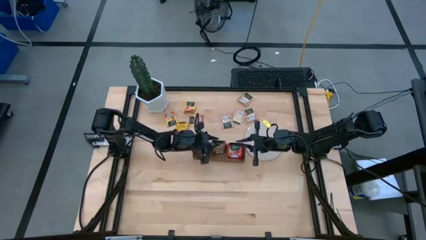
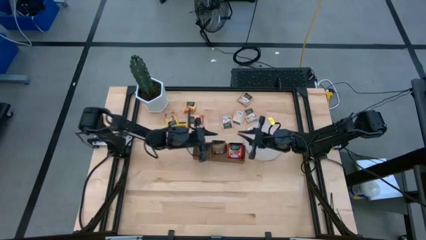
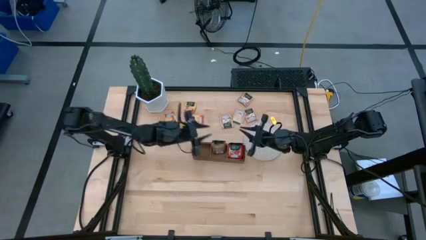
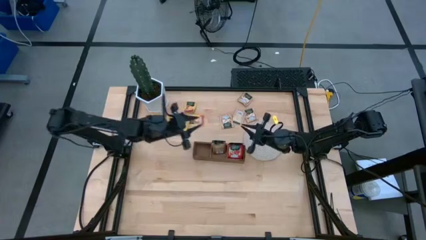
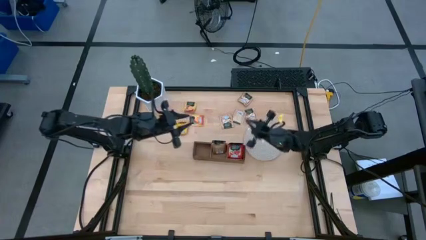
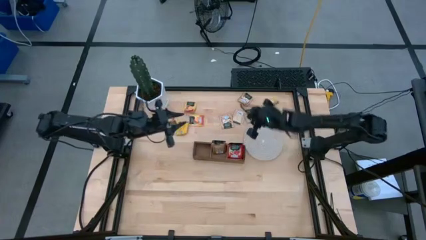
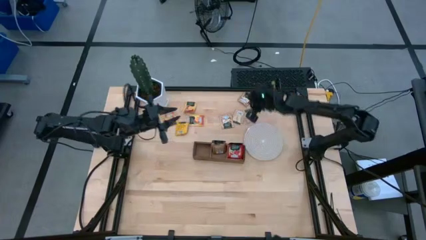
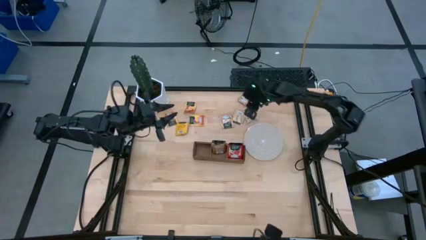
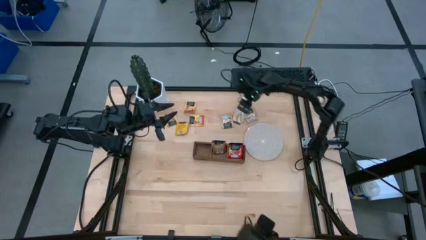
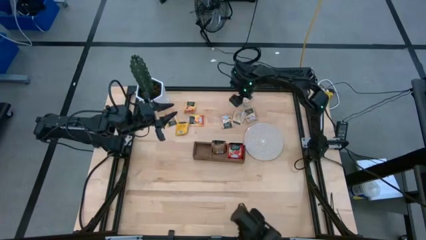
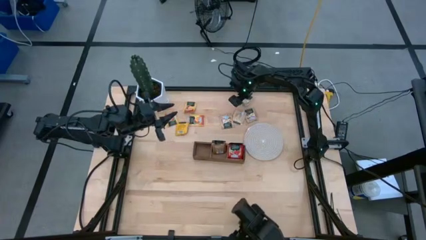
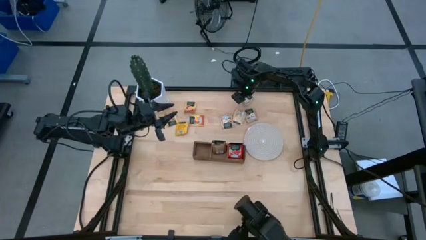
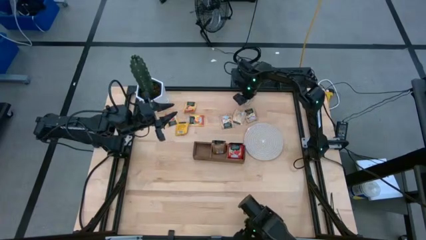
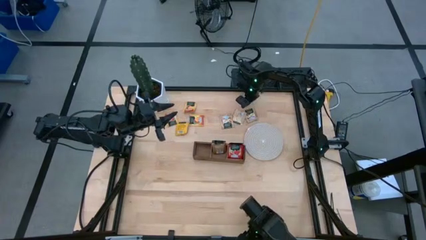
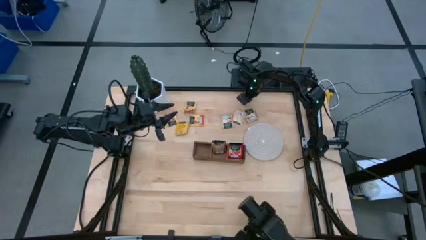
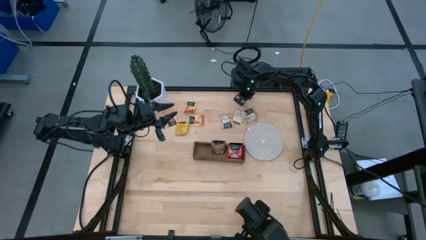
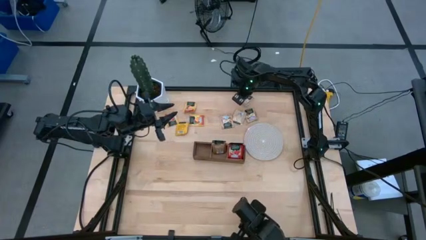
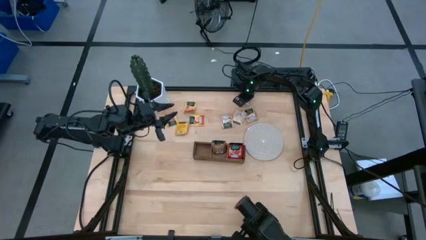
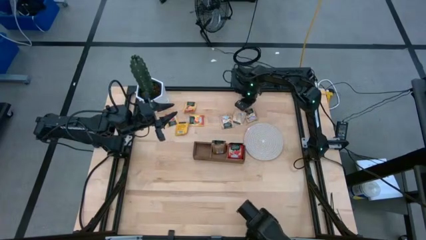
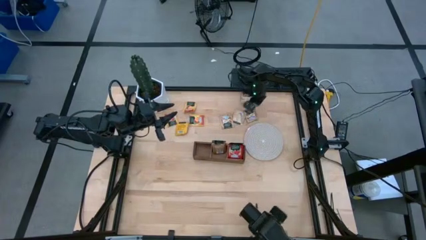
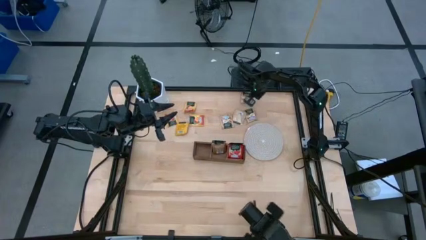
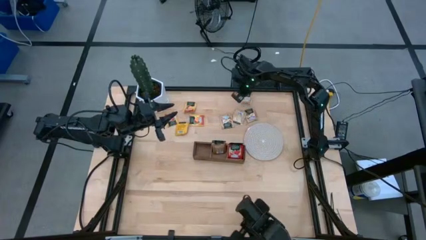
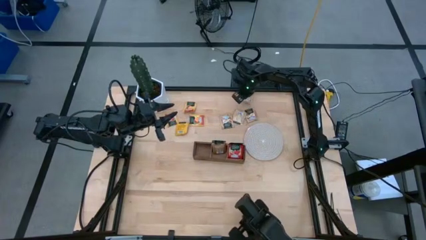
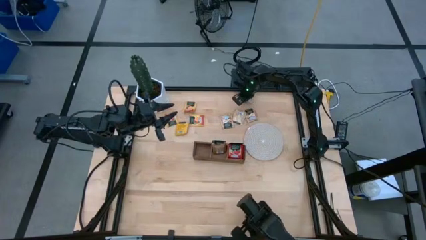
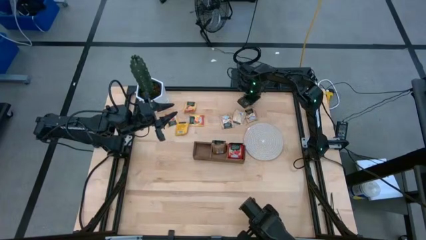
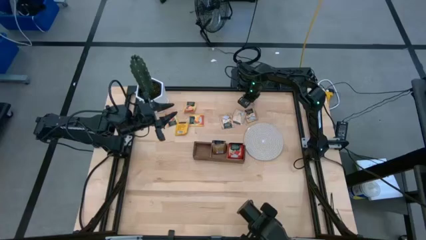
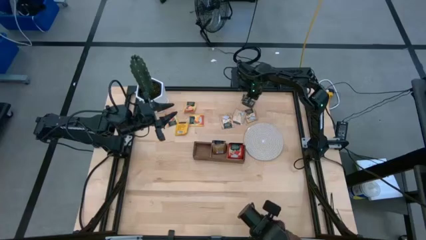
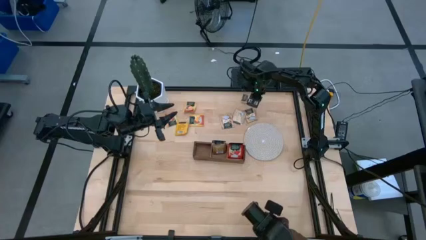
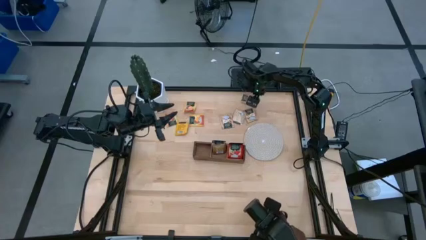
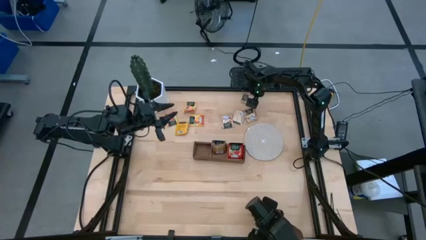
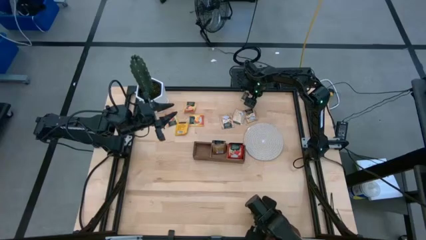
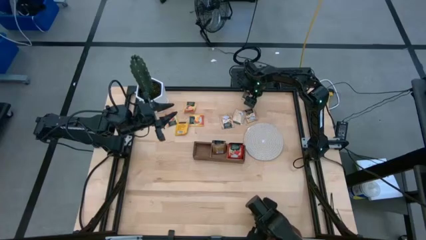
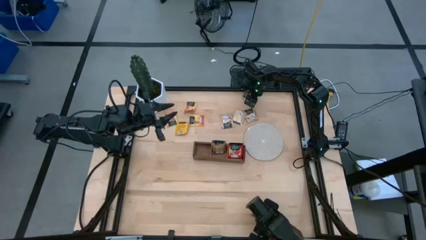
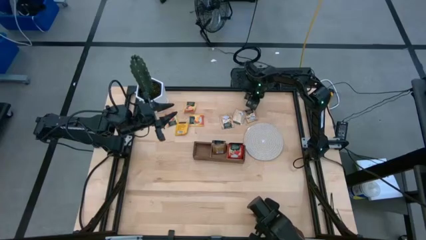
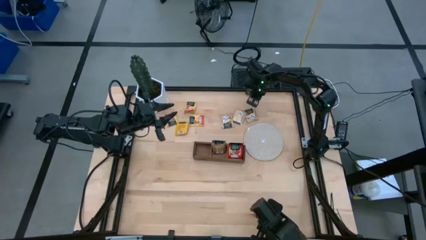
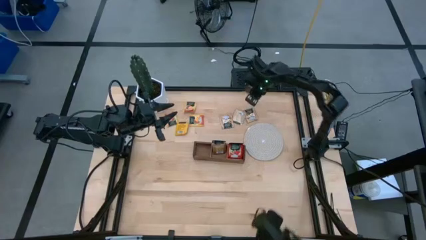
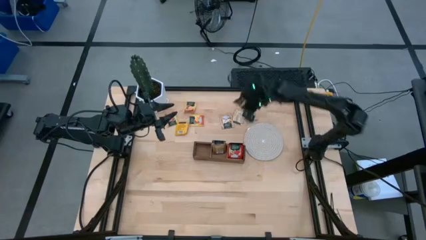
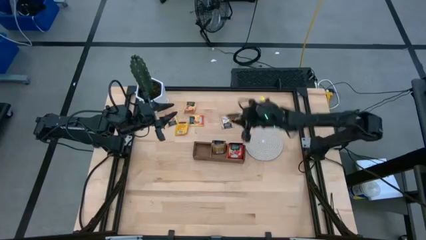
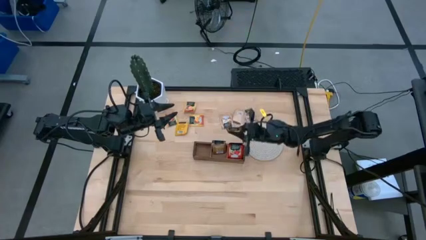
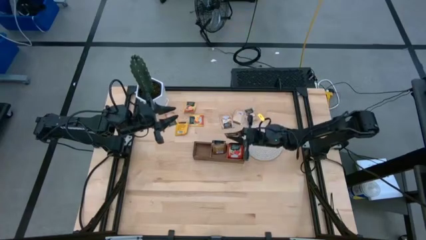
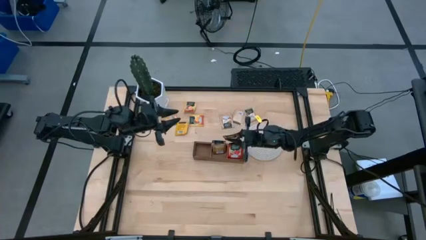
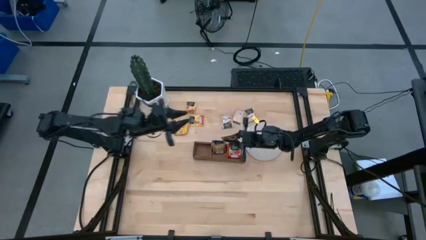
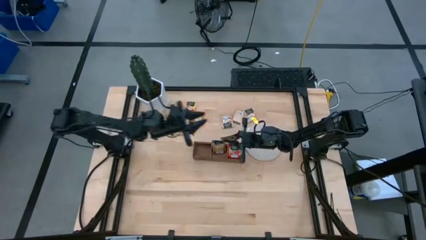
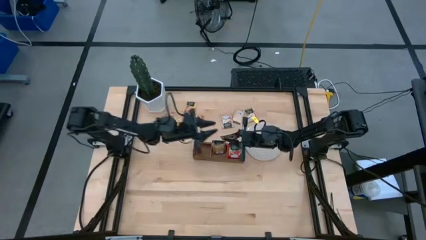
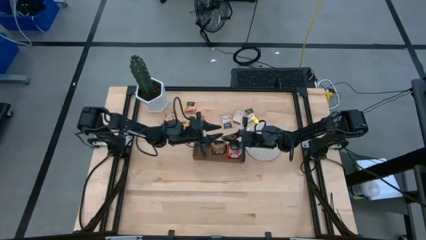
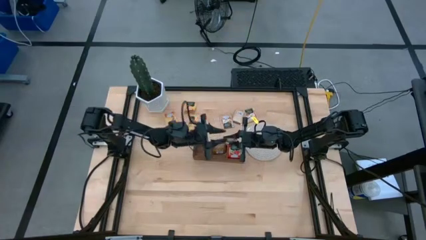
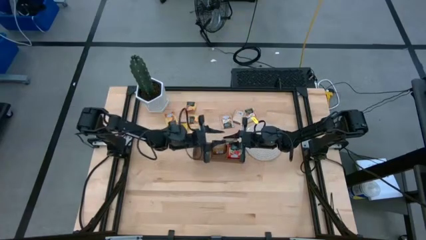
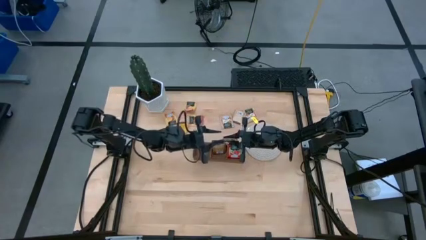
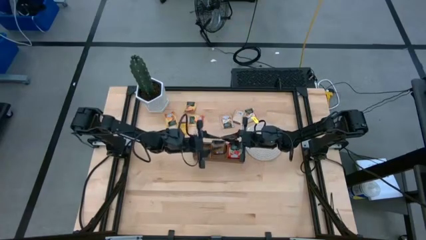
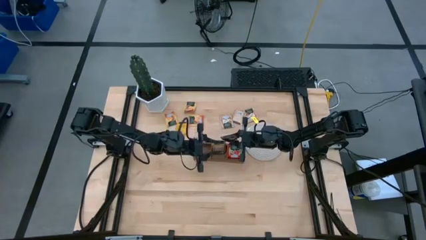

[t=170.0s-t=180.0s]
Task: Pick & Place Tea
Put the brown tea bag into the middle section of the wooden organizer

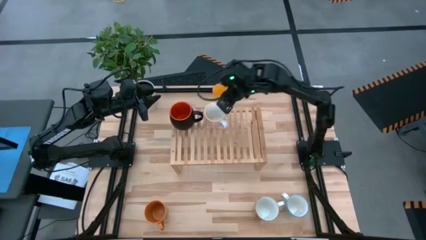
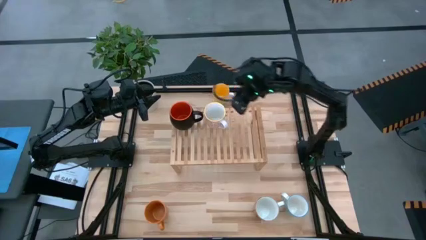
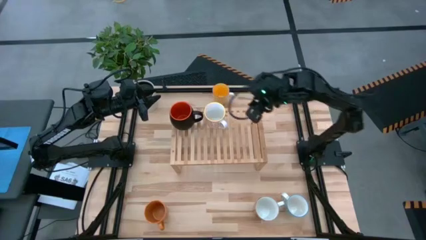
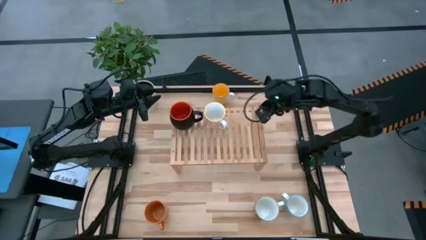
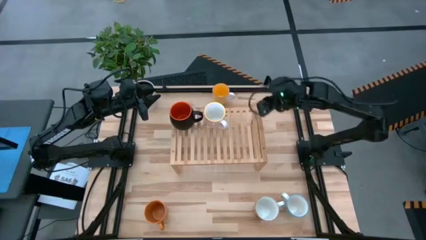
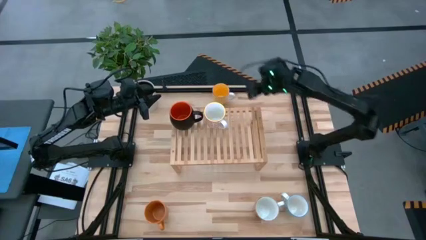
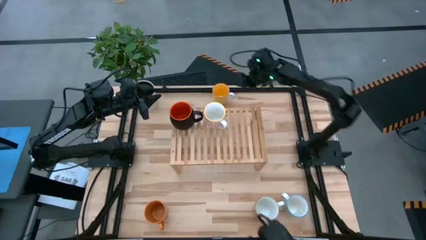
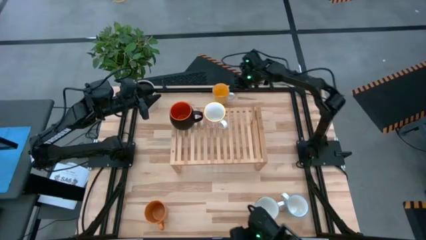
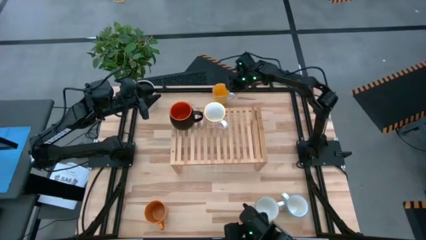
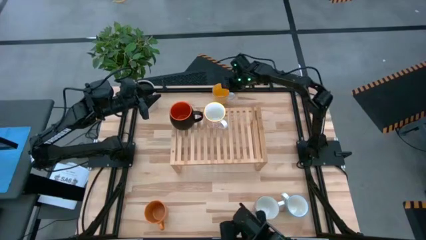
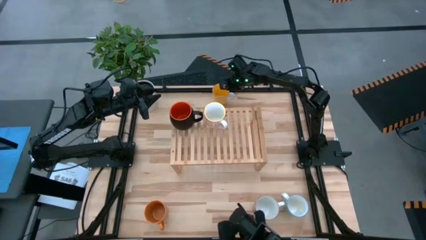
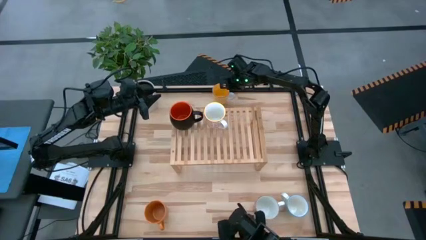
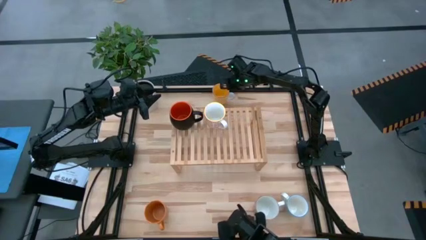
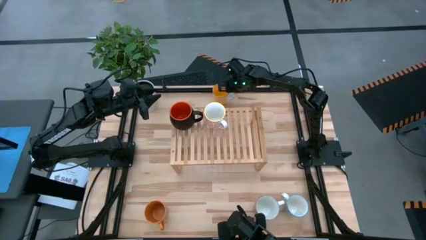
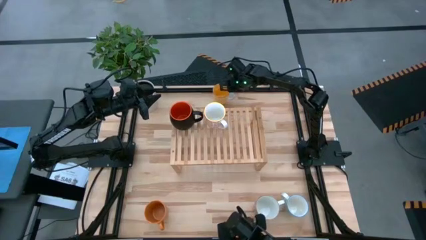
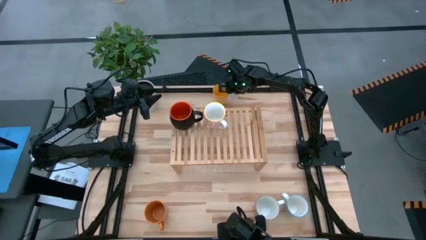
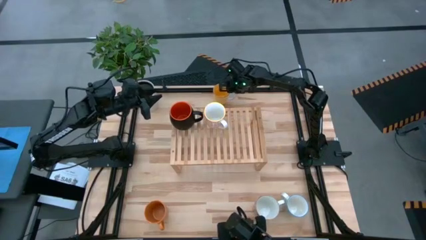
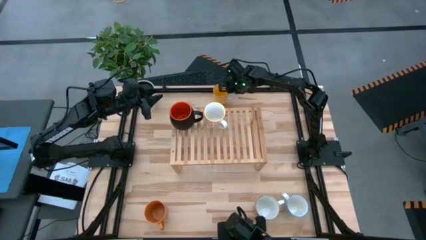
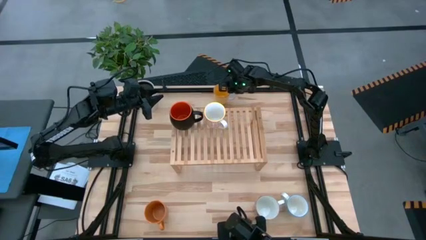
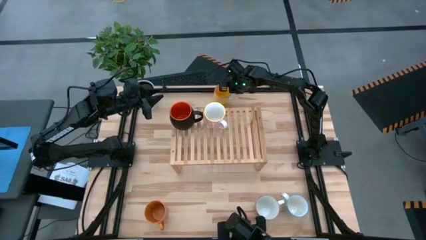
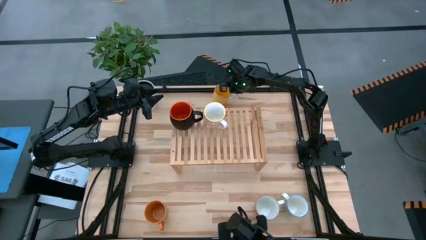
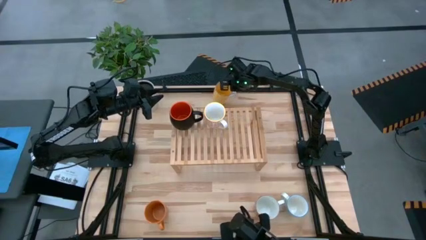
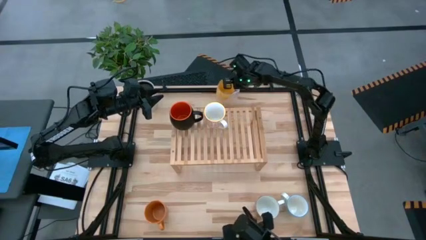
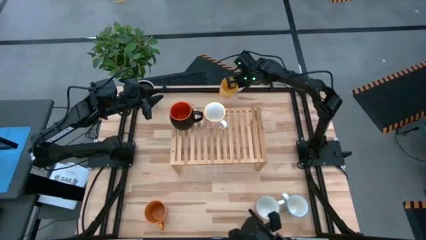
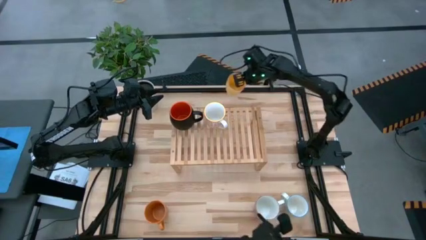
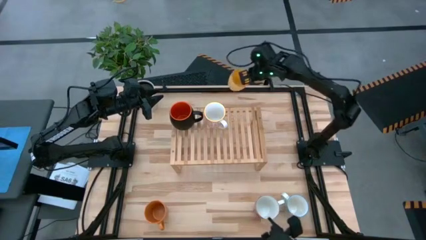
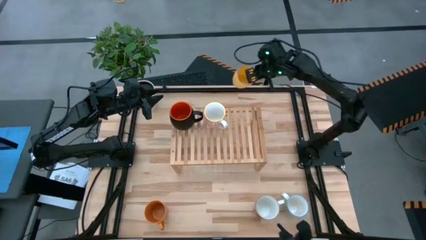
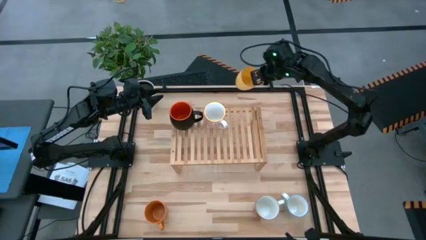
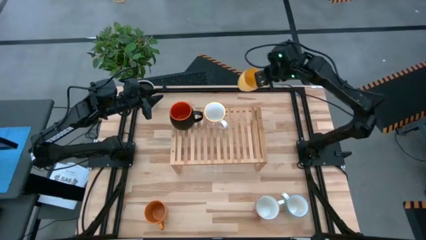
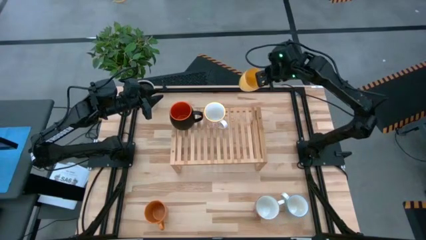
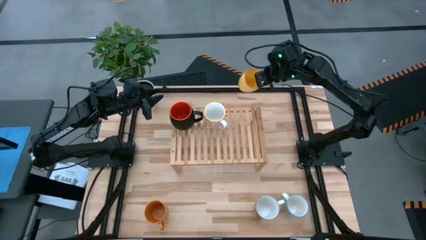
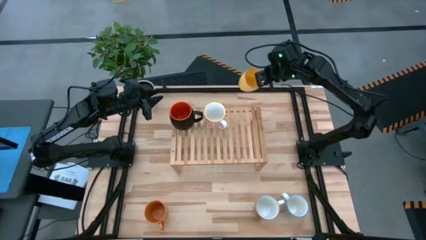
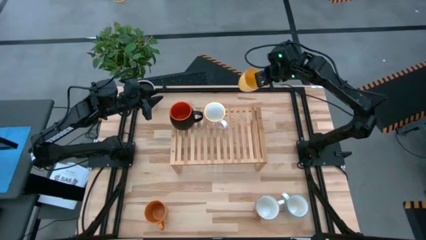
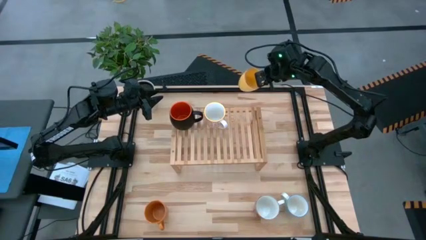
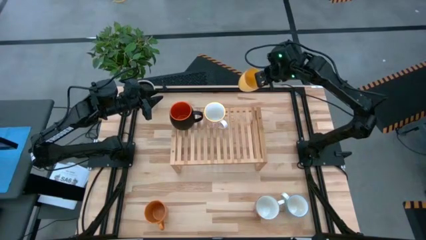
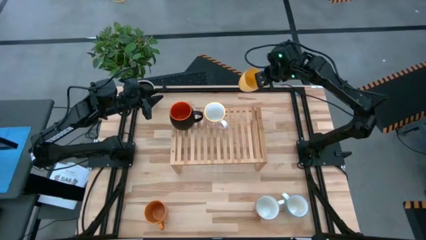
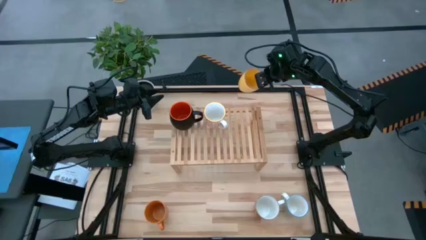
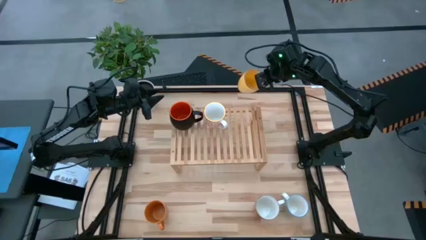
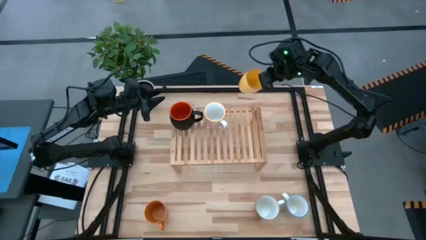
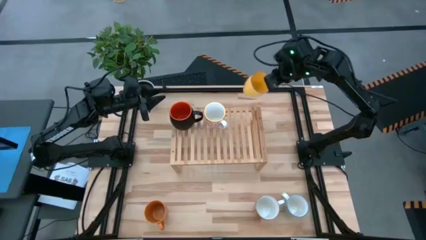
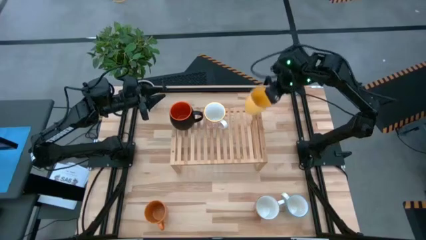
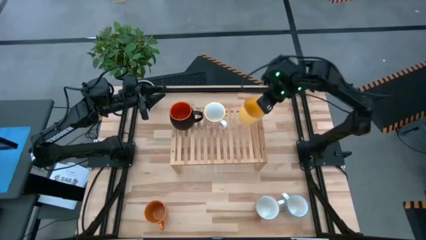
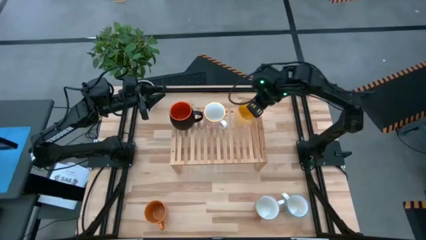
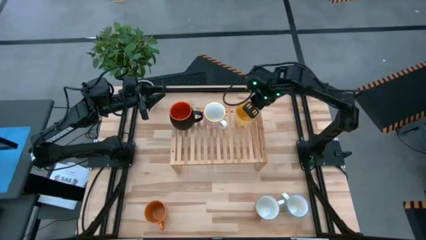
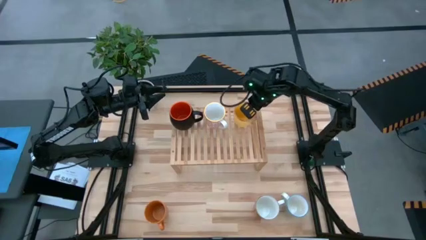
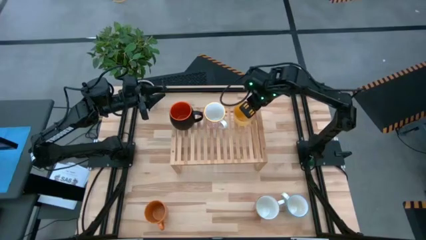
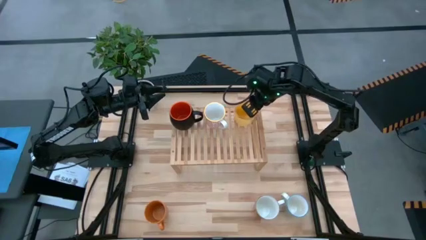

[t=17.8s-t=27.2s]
Task: Place coffee mugs
Put the yellow mug on the shelf
